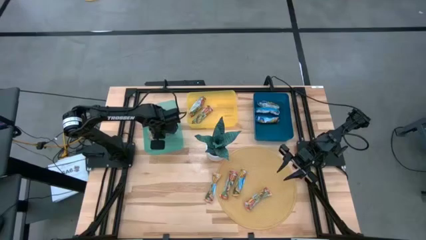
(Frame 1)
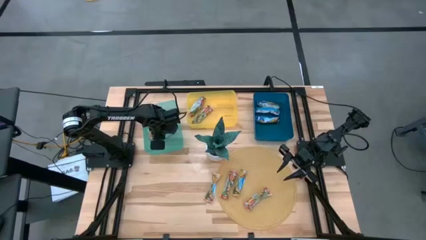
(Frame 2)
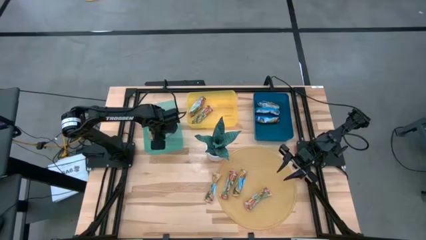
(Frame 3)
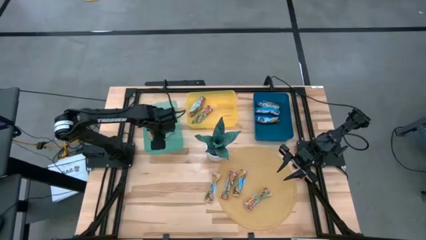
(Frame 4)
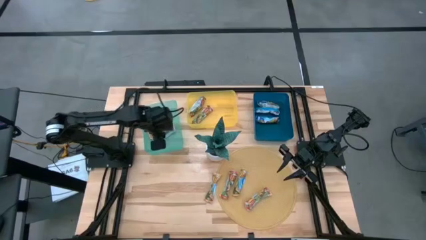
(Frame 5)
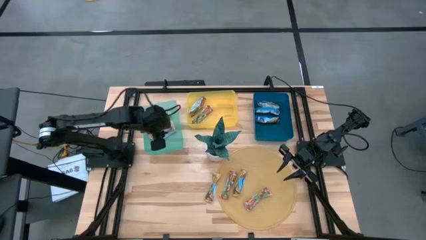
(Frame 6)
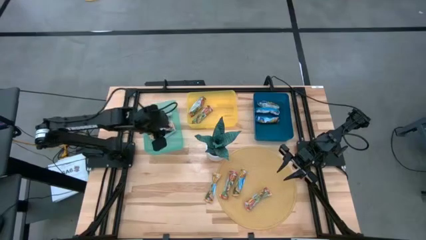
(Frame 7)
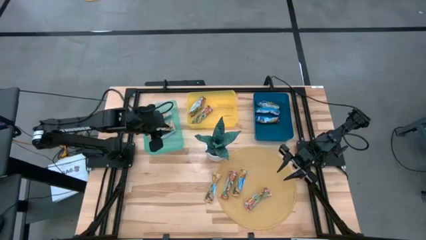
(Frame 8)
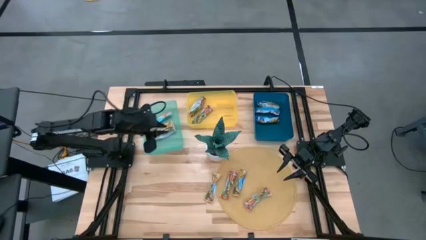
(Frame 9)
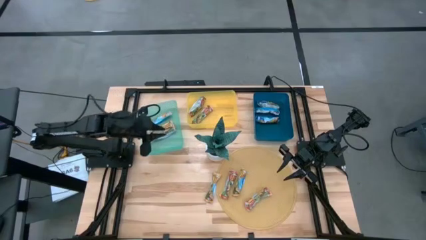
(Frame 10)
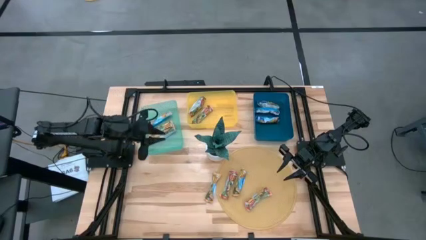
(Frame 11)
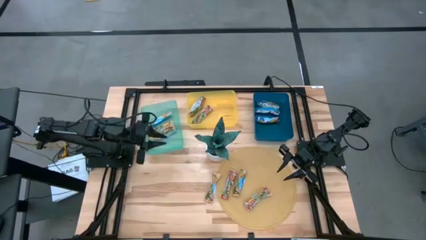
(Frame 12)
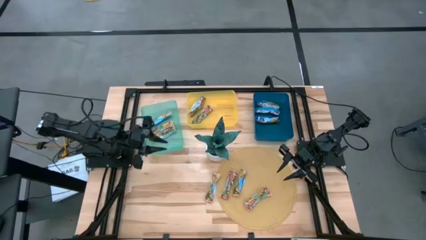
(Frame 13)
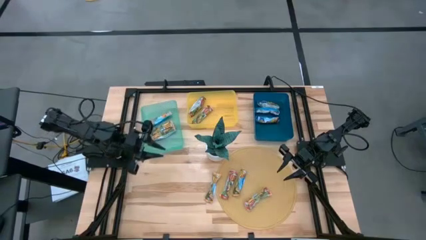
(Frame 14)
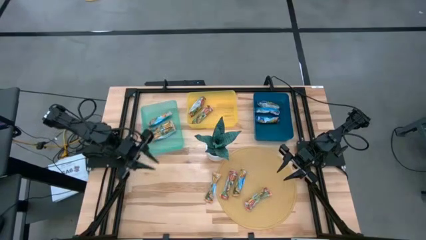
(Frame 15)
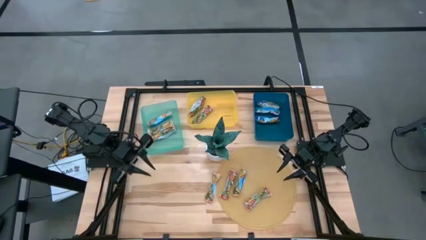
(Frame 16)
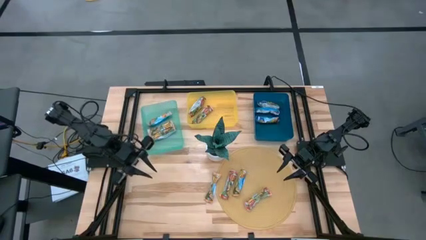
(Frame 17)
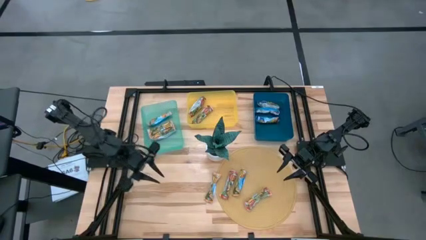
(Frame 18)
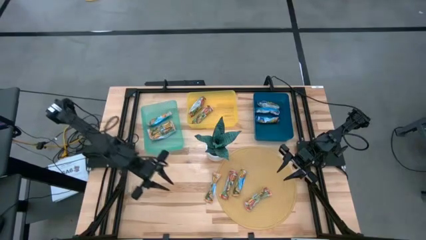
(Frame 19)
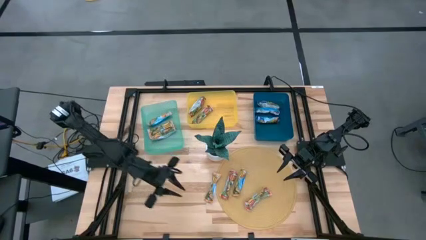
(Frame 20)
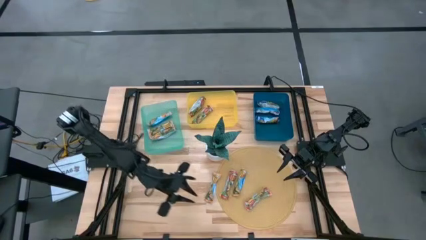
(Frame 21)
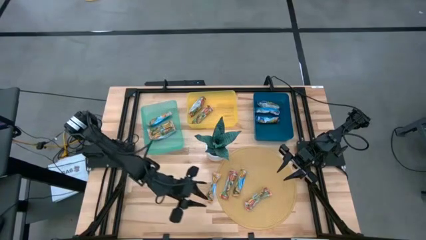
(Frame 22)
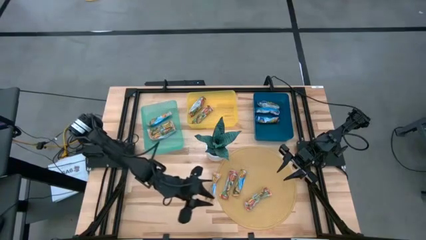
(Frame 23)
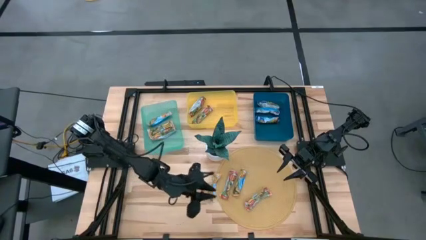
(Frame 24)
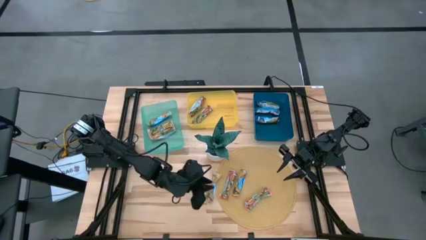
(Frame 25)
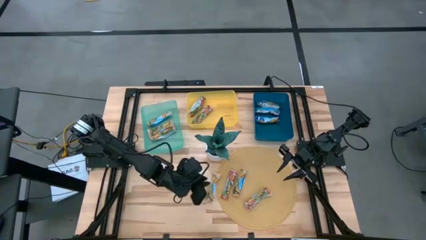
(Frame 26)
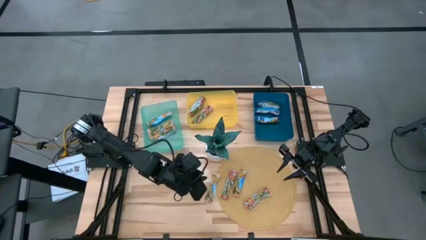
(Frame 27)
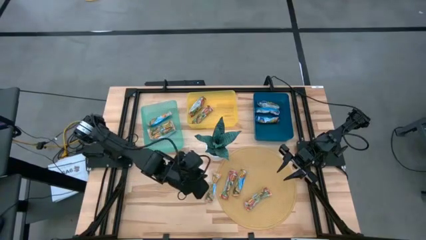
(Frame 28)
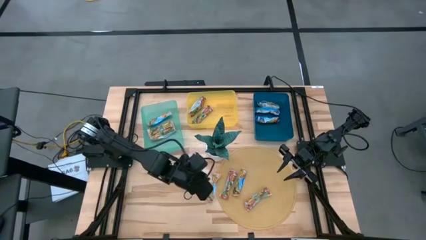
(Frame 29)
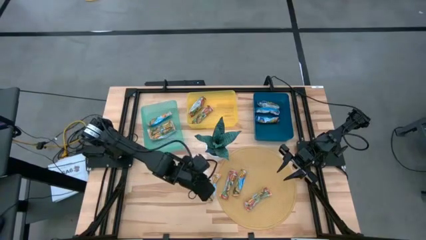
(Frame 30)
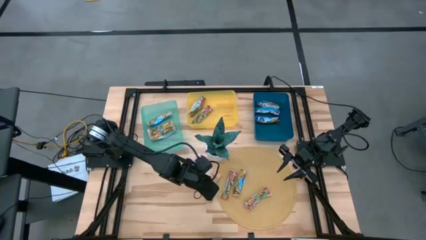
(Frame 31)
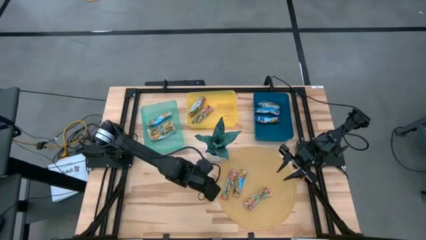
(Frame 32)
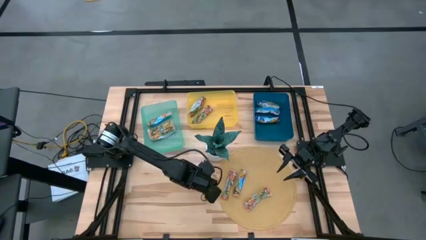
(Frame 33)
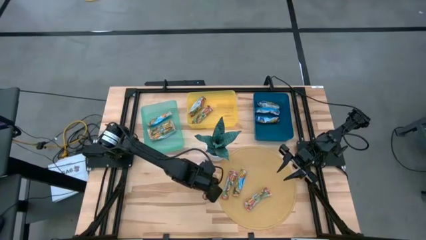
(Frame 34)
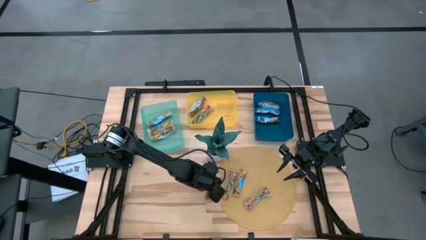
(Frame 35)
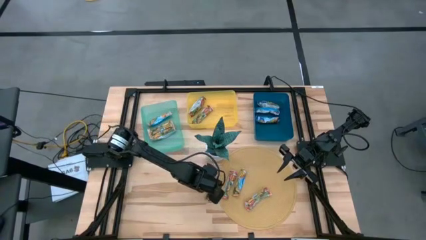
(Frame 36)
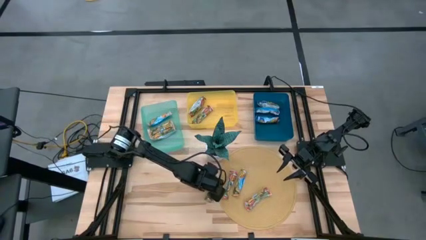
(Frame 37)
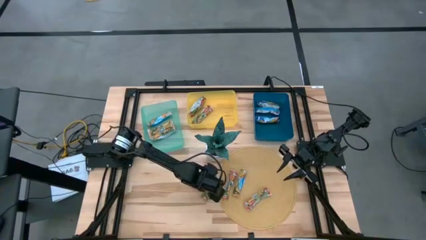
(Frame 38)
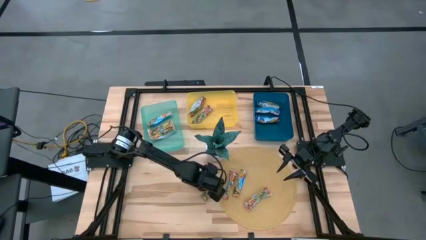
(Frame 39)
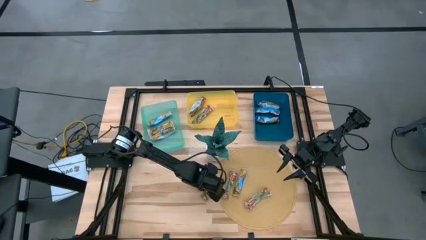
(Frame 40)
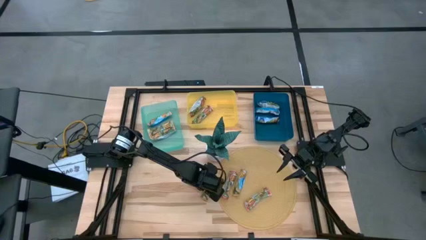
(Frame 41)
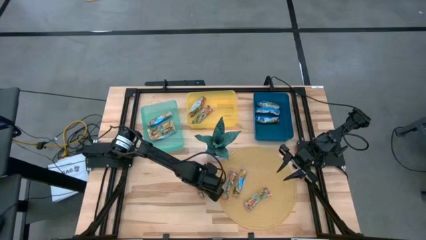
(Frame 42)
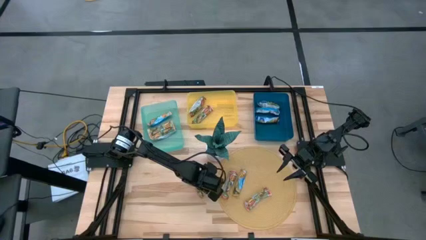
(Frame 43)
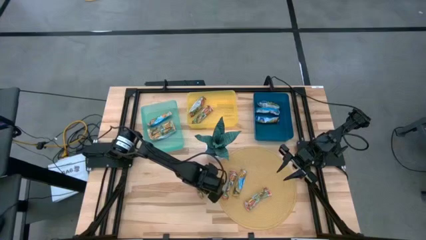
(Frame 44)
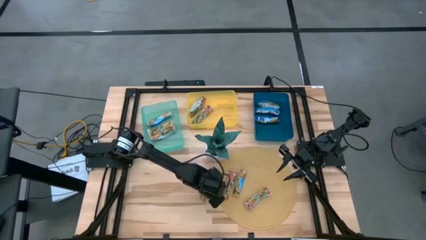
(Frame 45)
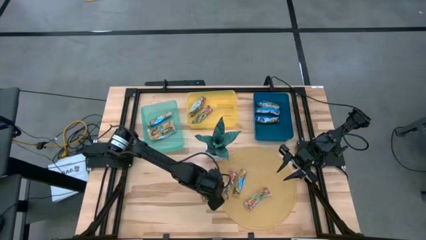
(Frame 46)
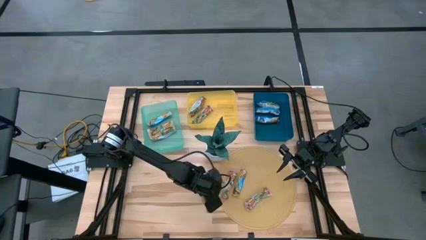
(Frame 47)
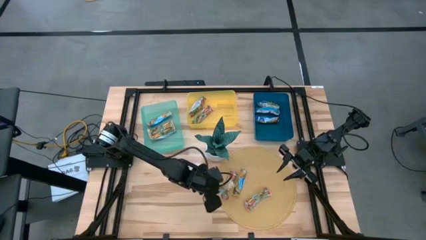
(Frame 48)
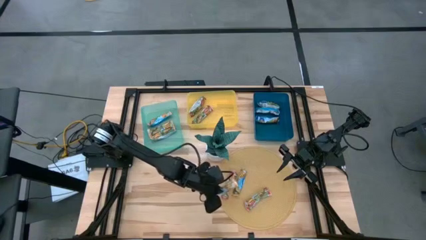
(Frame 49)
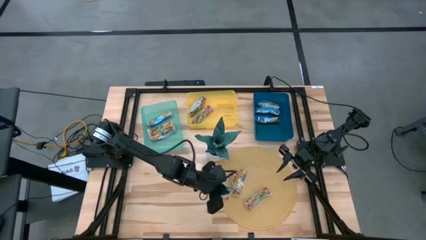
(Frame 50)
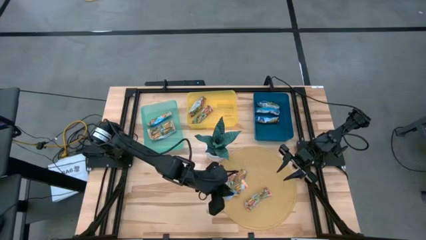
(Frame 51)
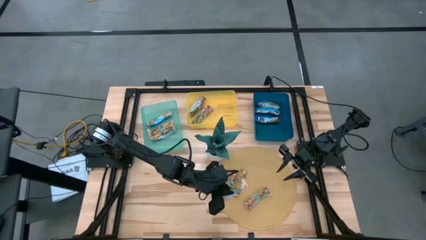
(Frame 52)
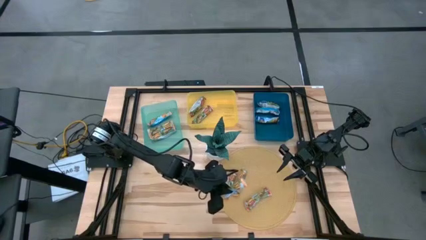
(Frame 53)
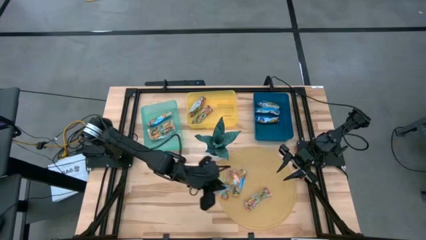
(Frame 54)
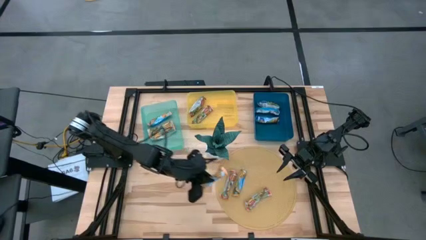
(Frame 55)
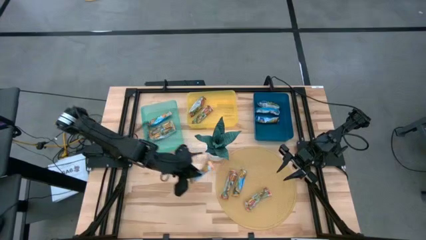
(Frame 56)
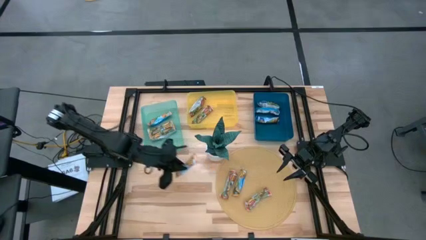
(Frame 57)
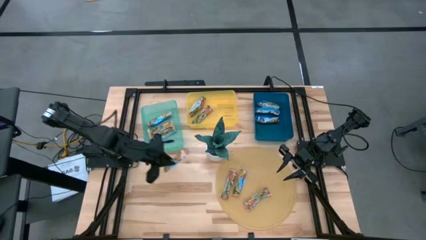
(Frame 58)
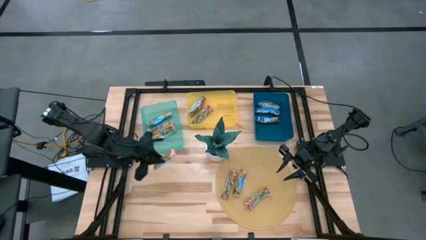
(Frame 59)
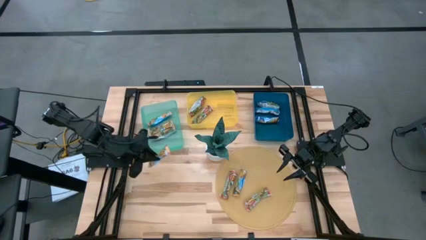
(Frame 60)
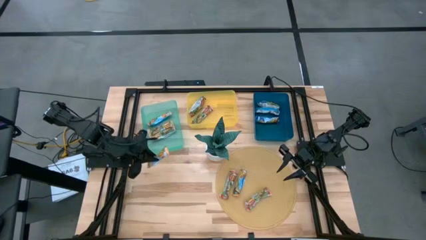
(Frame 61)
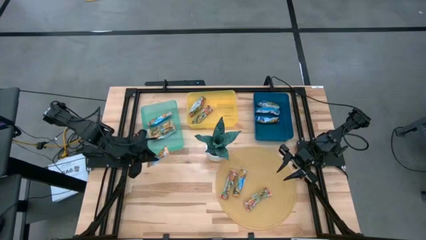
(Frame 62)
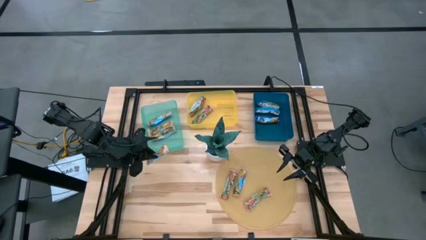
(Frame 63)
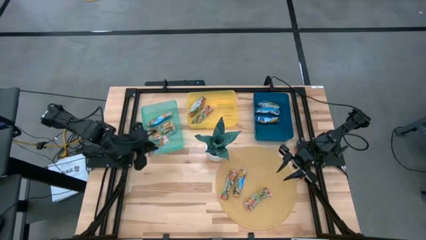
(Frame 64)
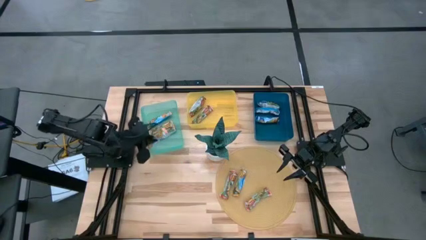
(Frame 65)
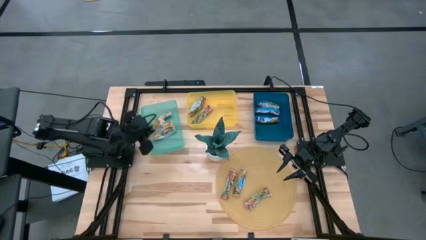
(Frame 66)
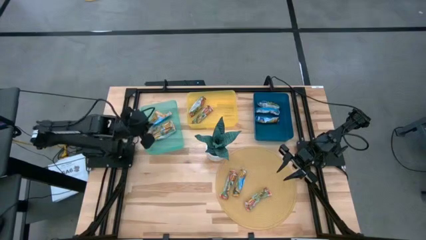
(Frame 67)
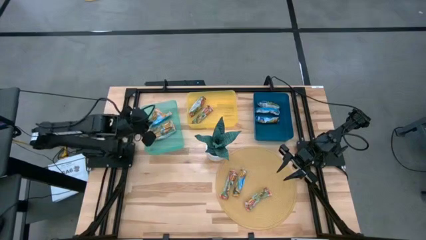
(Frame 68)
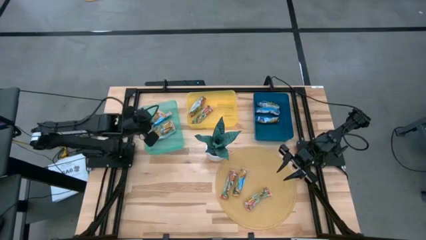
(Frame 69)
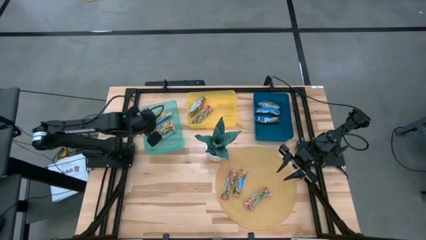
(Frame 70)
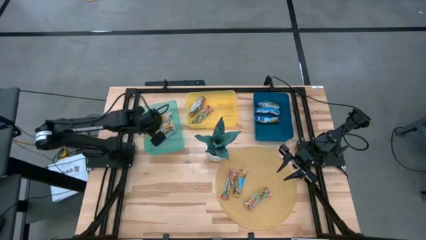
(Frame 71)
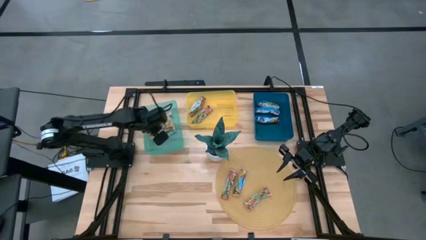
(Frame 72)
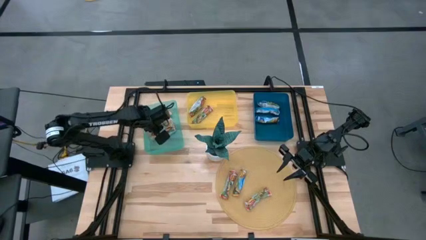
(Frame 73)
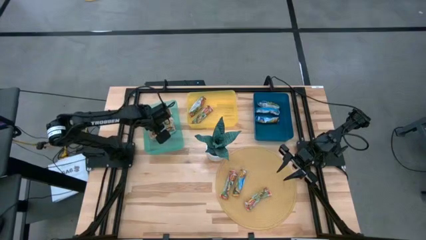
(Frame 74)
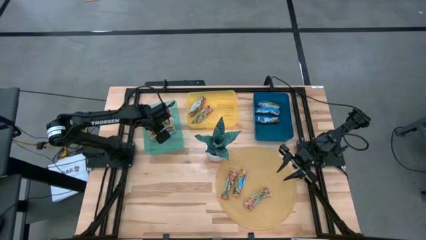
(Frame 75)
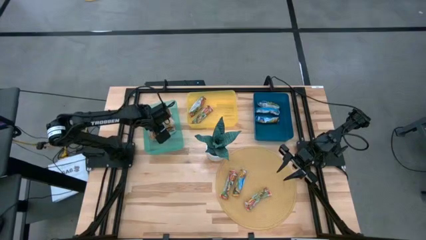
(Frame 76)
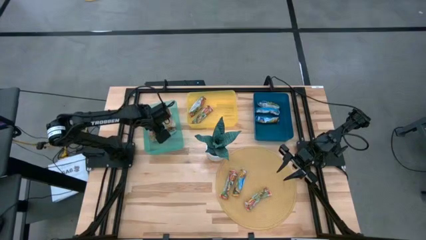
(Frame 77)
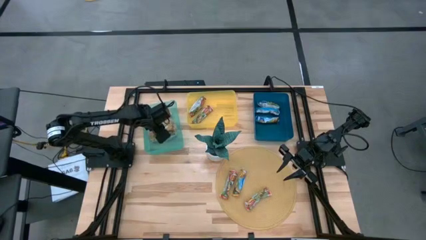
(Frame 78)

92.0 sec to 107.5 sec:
Task: Pick and place Granola Bars by type
Put the orange granola bar into the green bin
